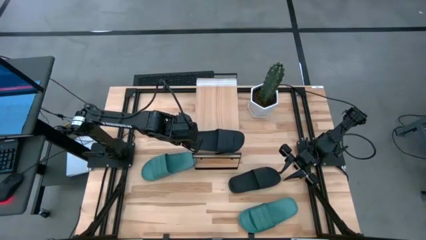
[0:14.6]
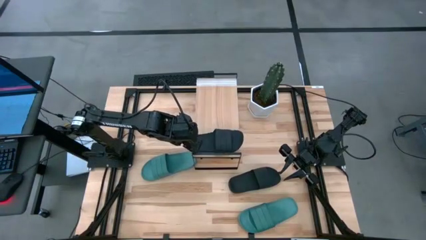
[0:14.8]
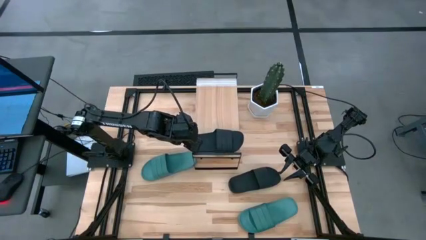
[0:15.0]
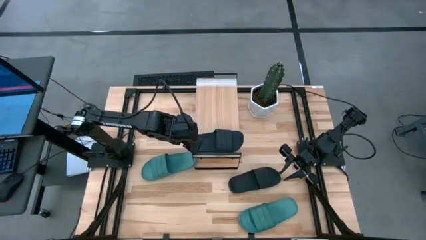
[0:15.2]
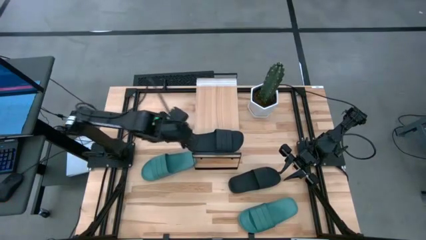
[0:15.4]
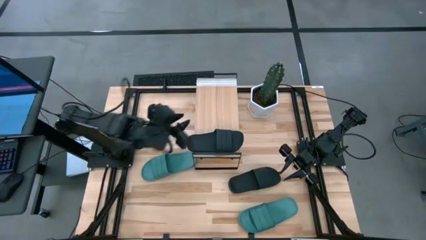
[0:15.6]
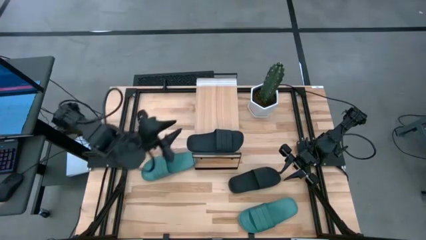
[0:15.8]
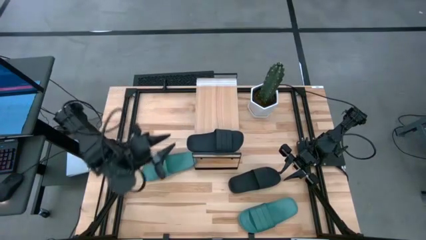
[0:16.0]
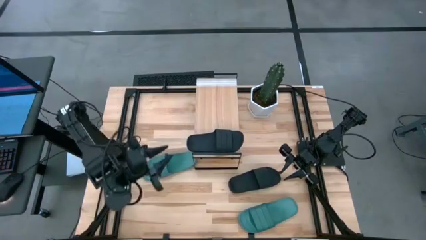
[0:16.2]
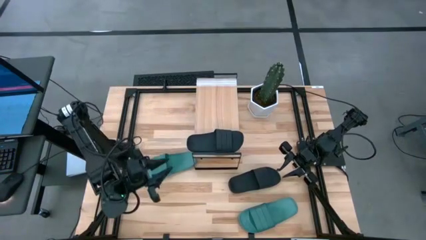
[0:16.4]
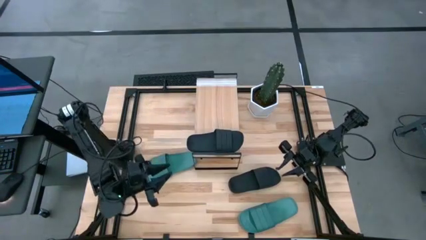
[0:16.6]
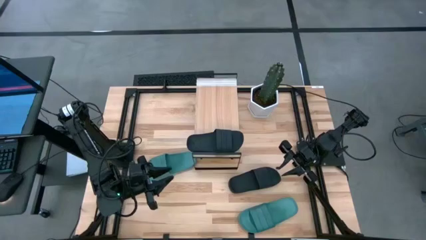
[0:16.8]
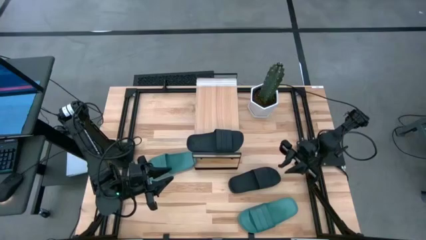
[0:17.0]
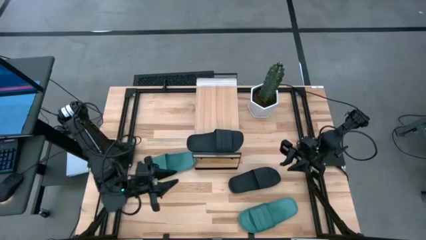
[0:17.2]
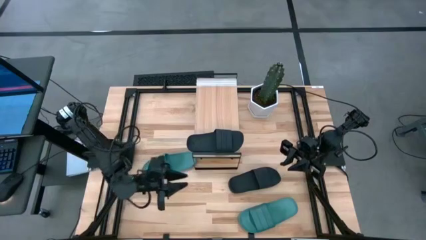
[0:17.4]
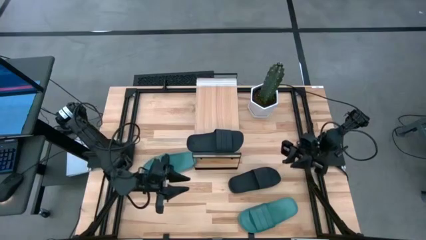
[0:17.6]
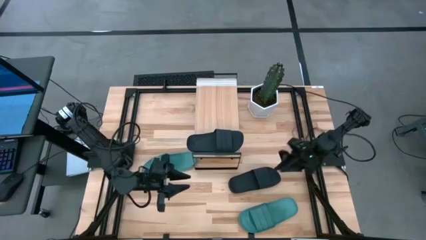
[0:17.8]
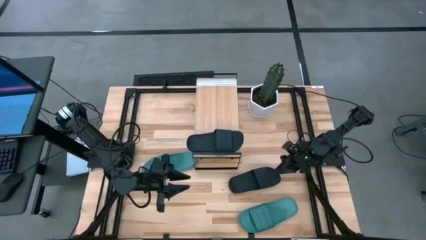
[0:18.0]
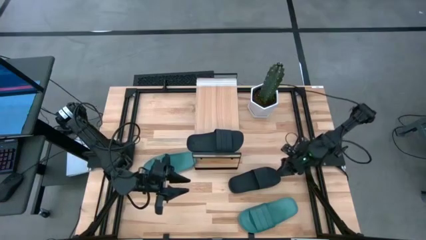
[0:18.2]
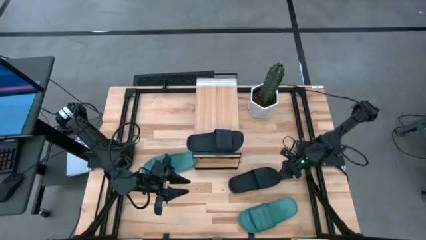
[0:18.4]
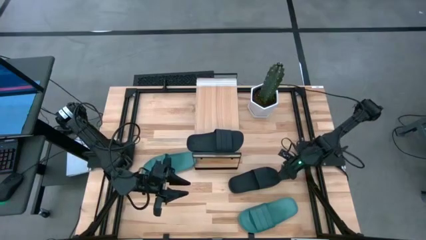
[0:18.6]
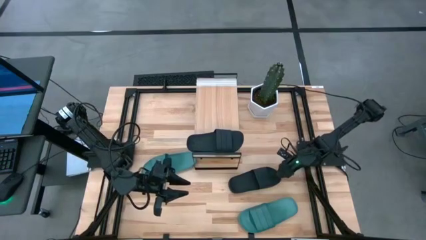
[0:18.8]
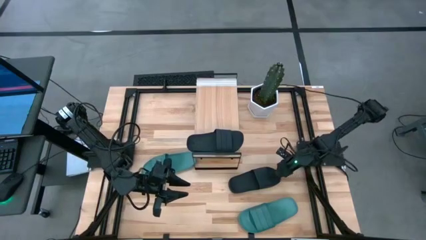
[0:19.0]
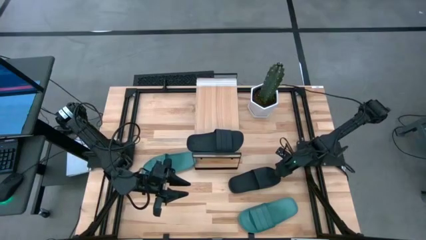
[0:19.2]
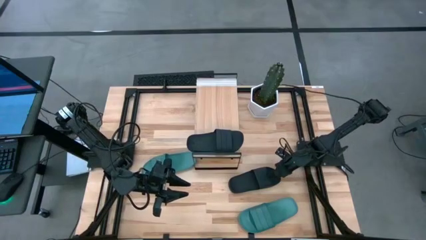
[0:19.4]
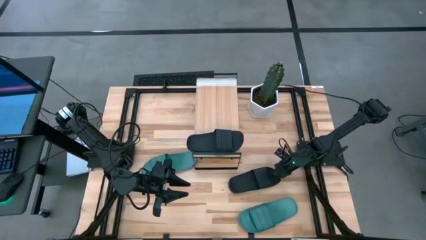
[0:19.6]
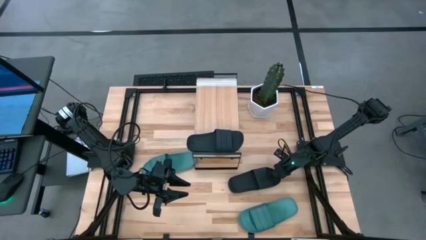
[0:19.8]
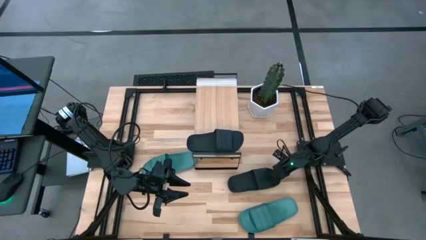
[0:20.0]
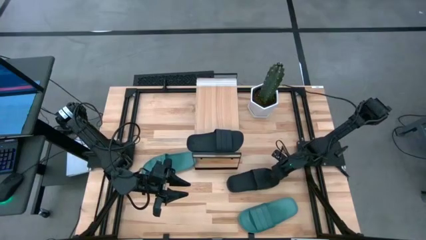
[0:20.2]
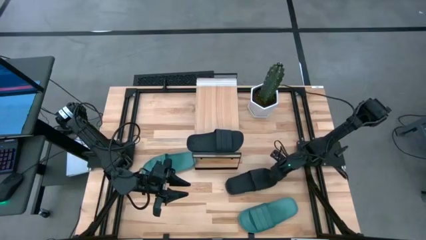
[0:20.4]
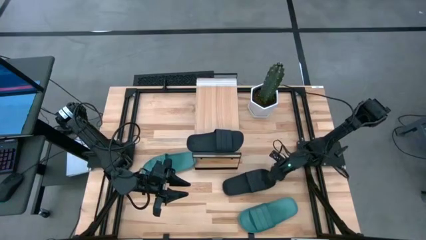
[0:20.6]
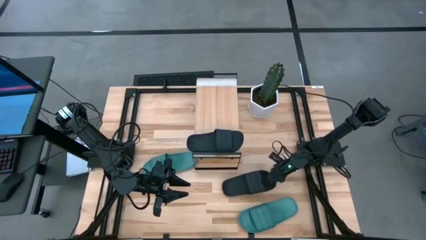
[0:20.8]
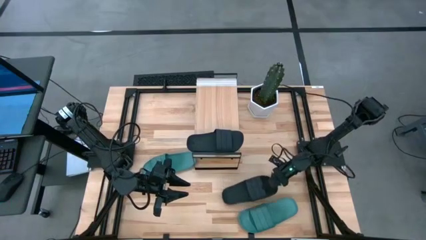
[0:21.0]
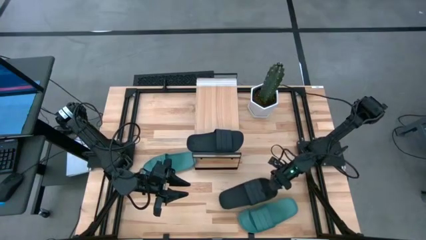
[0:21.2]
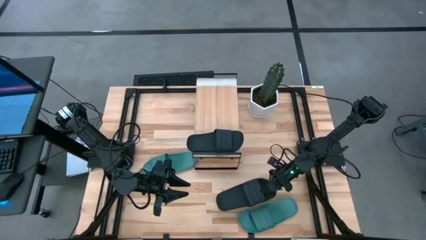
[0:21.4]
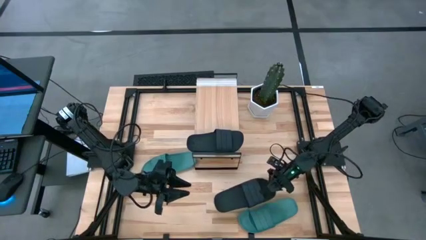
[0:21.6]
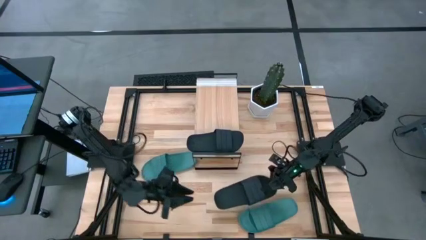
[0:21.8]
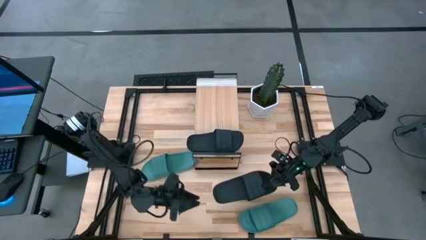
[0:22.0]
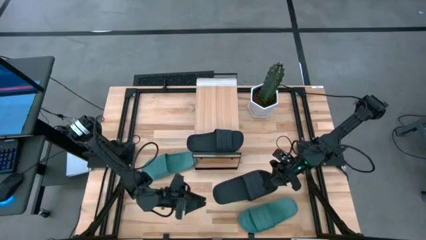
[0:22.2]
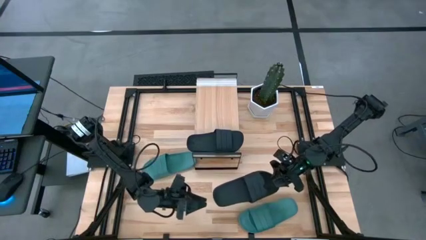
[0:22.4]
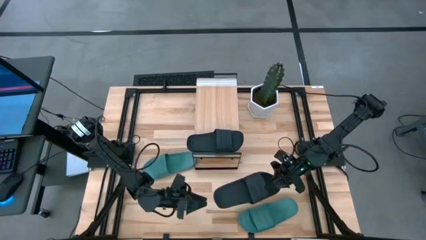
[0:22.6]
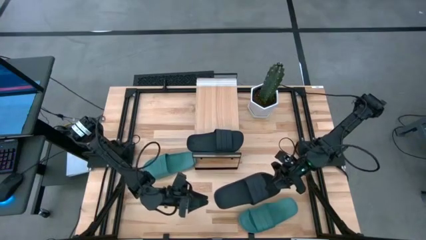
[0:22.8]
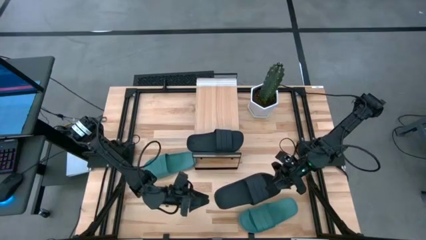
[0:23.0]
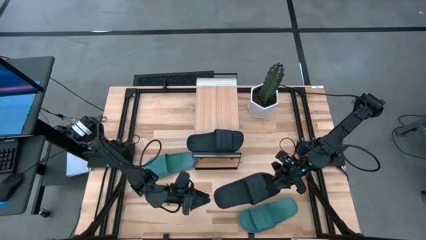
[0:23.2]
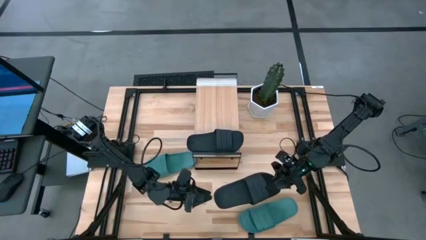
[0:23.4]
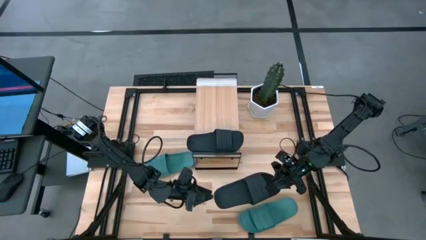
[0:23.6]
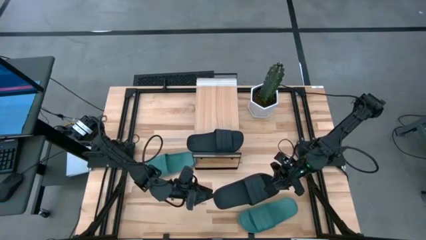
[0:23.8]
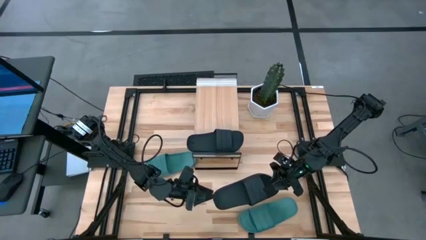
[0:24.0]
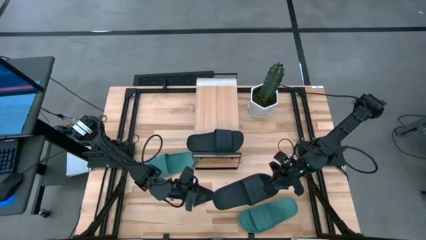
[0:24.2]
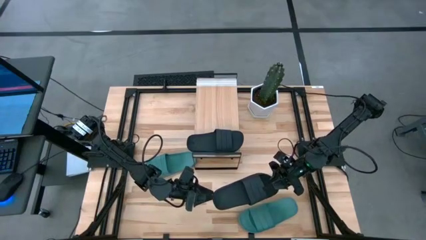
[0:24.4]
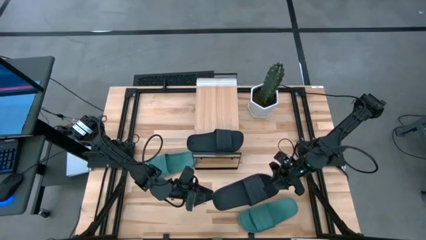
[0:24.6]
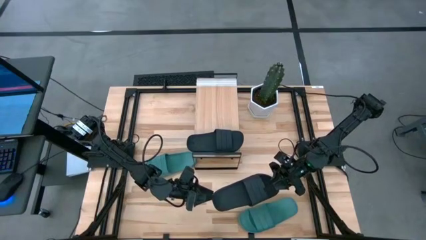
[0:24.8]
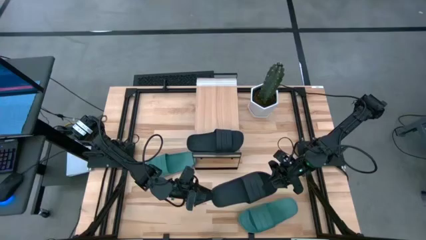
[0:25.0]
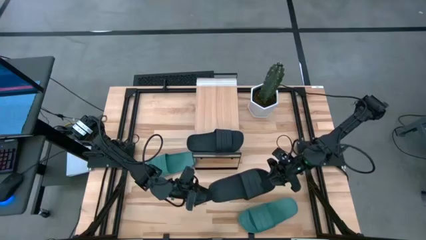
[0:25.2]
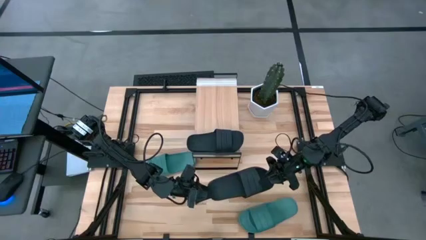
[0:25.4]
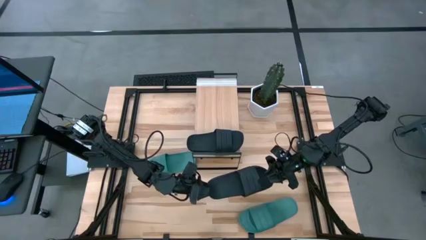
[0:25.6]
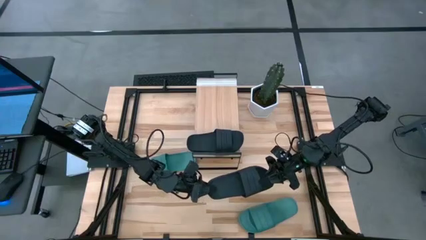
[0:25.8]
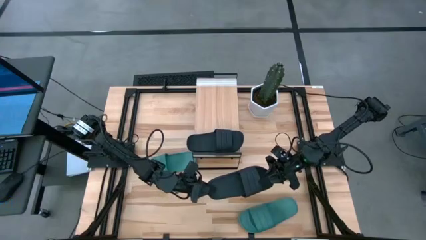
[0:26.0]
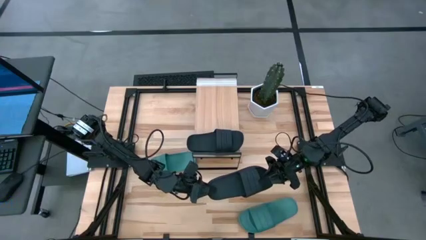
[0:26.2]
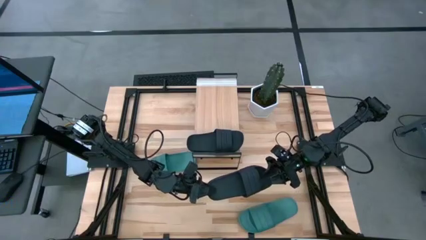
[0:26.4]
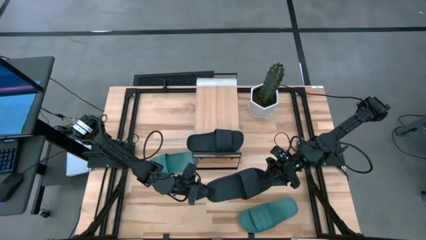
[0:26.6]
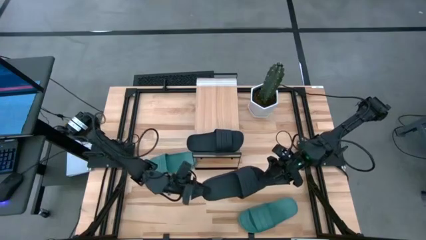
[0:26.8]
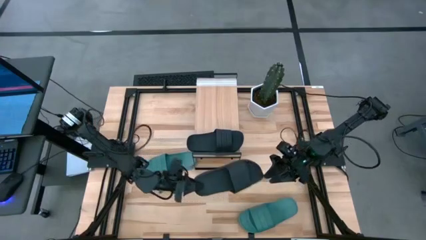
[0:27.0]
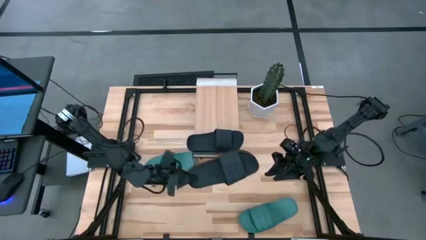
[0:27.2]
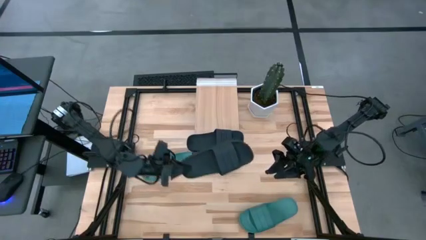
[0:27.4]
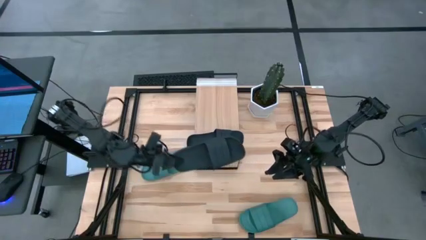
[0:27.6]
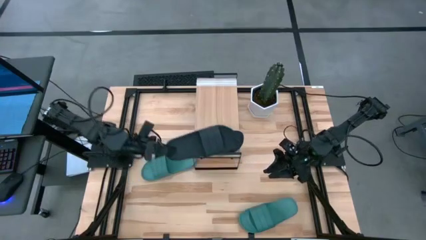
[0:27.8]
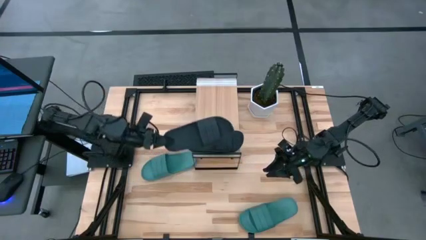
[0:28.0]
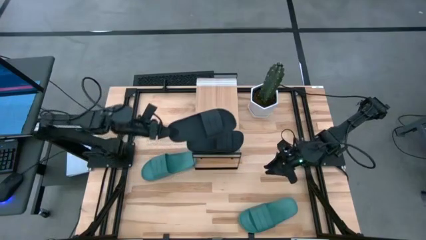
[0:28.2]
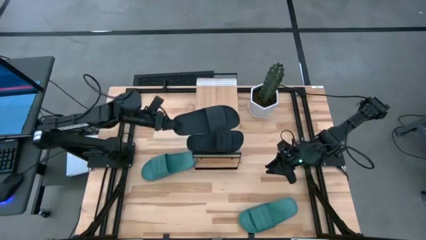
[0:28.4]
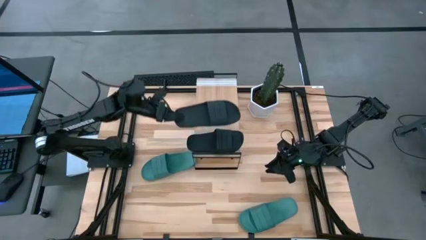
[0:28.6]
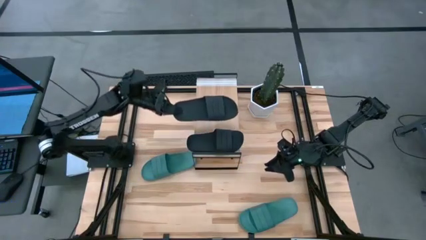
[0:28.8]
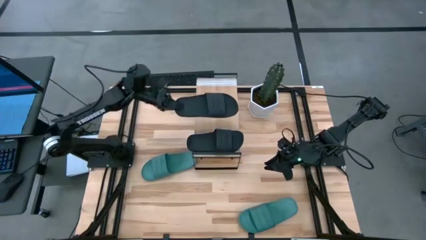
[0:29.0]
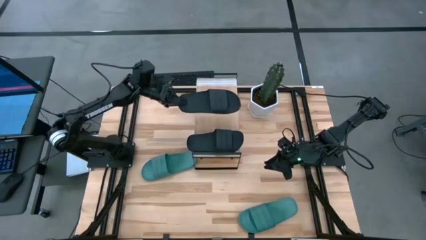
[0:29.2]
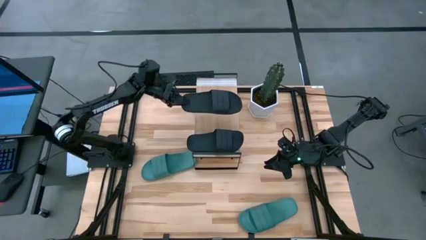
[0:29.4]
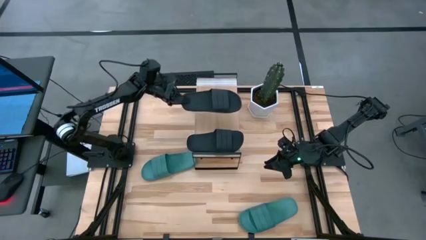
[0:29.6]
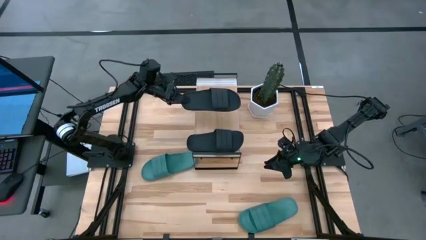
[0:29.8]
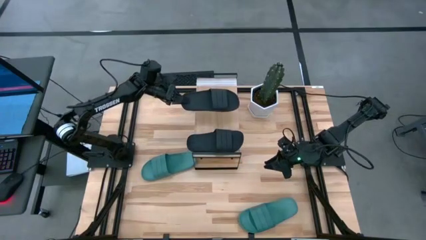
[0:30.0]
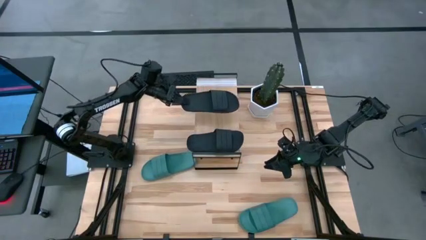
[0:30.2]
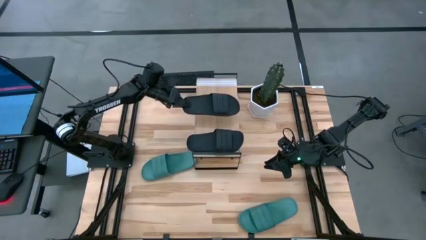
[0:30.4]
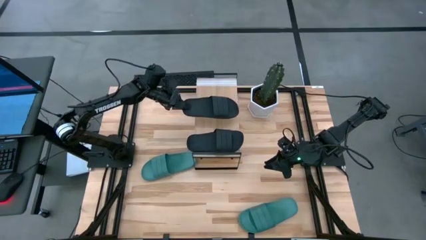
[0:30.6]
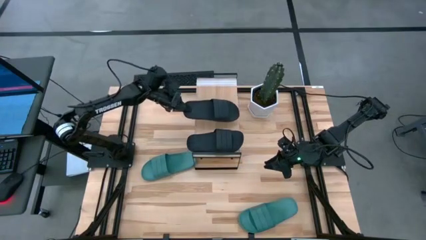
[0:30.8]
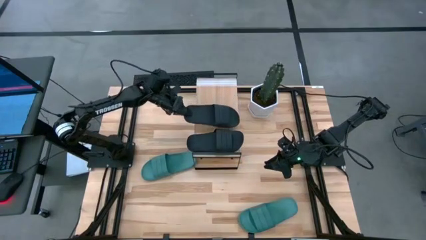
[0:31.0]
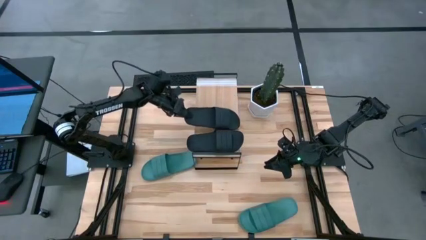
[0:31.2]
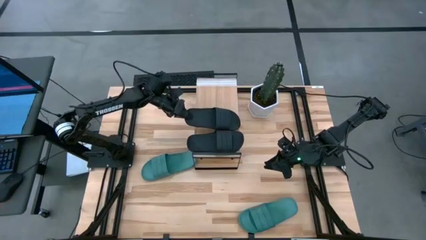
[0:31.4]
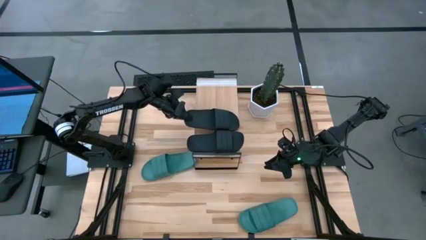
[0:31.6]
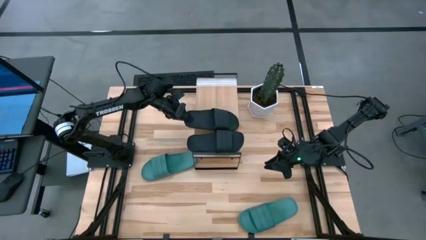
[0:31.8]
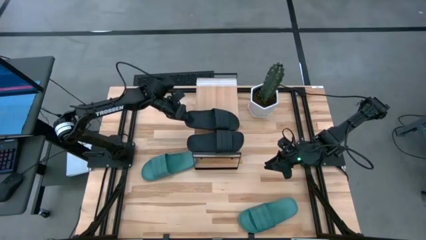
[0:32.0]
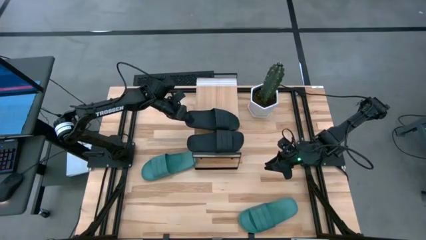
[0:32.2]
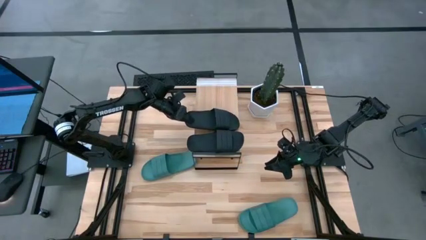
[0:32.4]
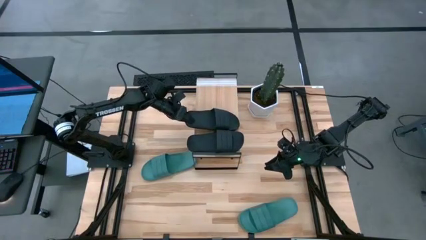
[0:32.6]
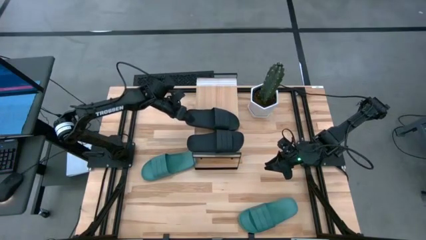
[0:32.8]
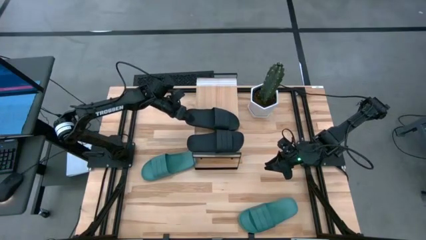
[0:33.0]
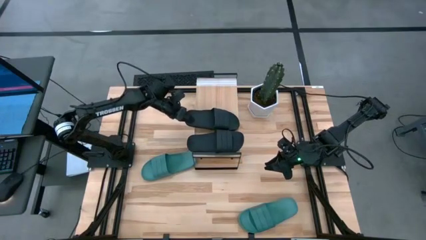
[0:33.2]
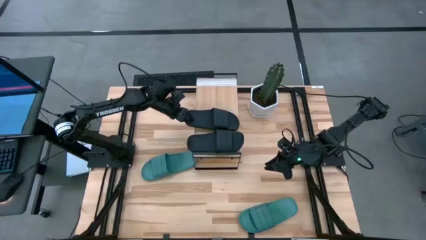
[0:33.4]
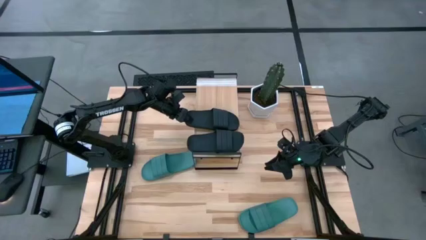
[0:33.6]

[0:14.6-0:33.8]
Task: Pick and place slides into the shelf
Put the black slipper on the shelf
